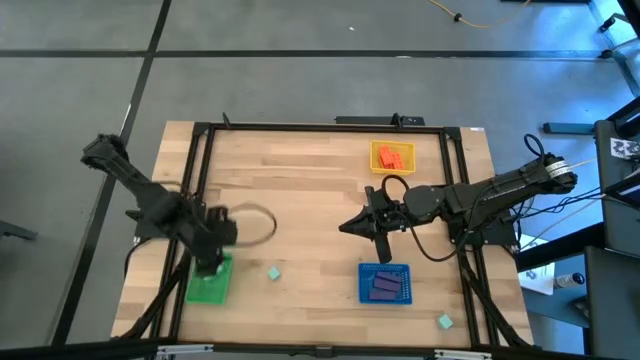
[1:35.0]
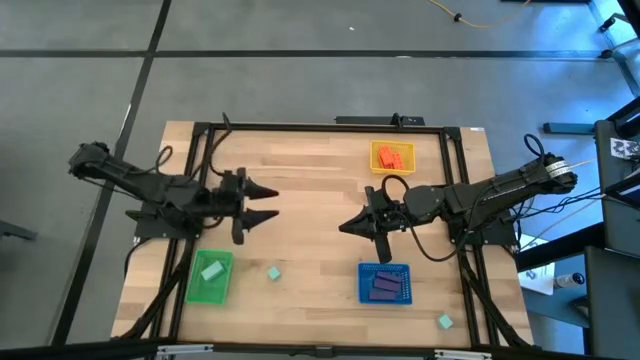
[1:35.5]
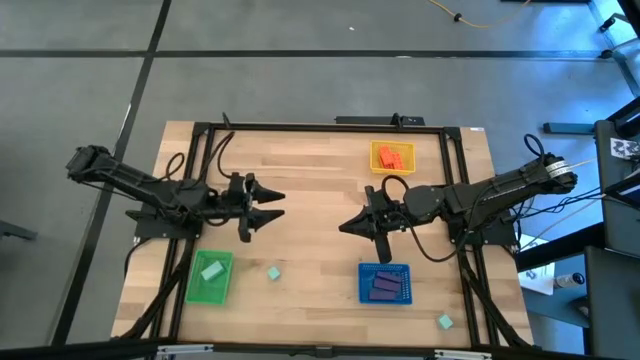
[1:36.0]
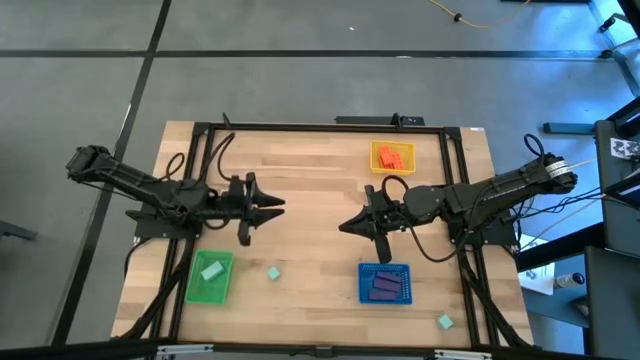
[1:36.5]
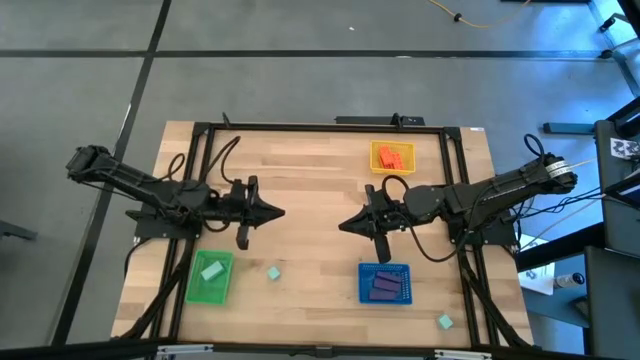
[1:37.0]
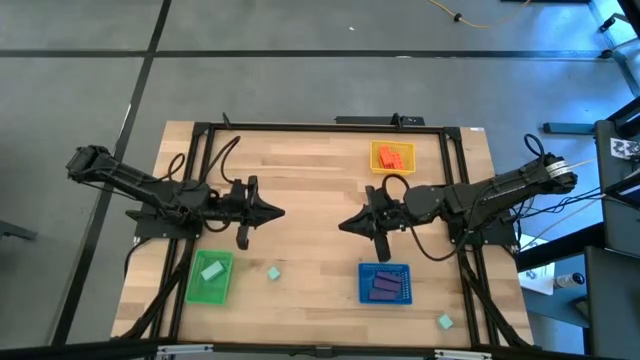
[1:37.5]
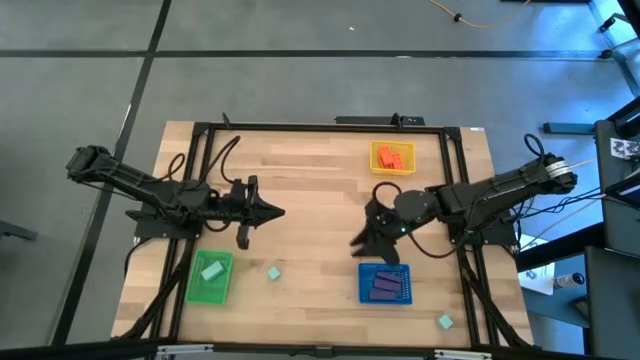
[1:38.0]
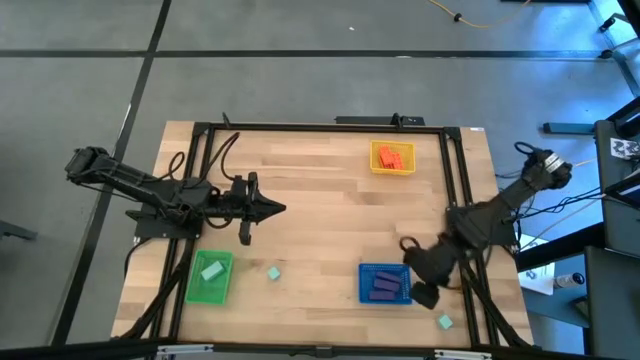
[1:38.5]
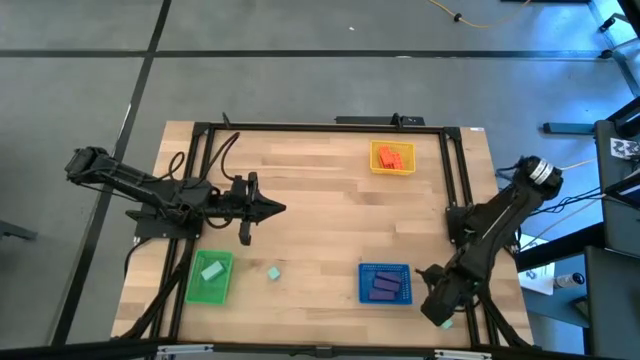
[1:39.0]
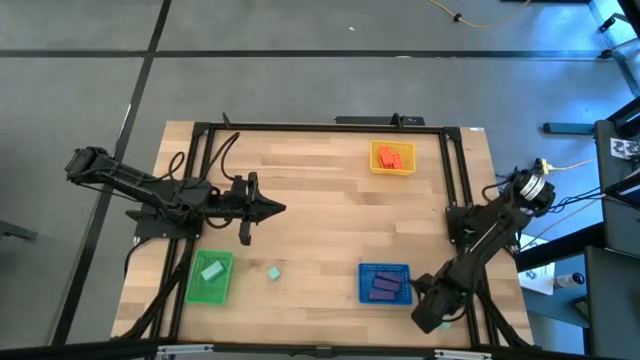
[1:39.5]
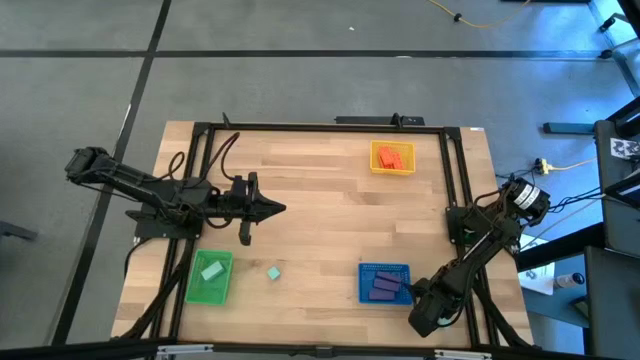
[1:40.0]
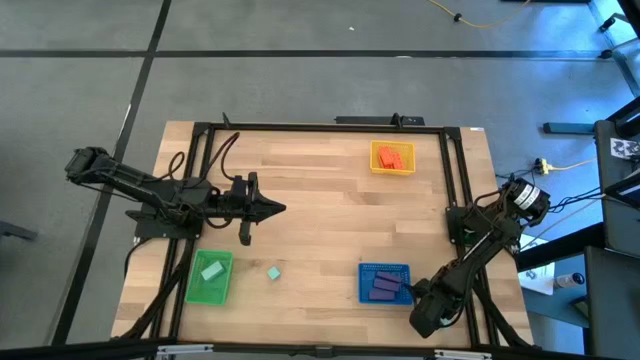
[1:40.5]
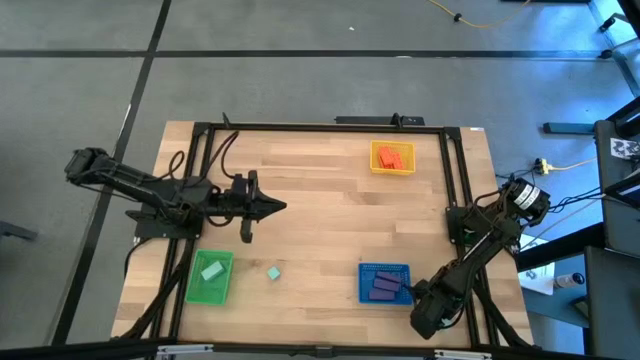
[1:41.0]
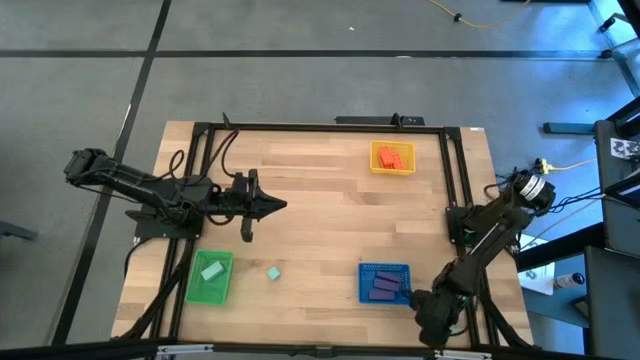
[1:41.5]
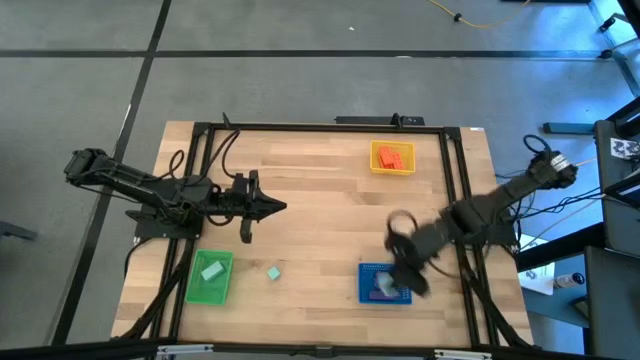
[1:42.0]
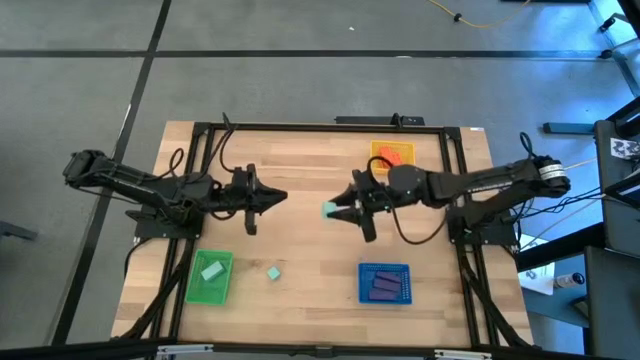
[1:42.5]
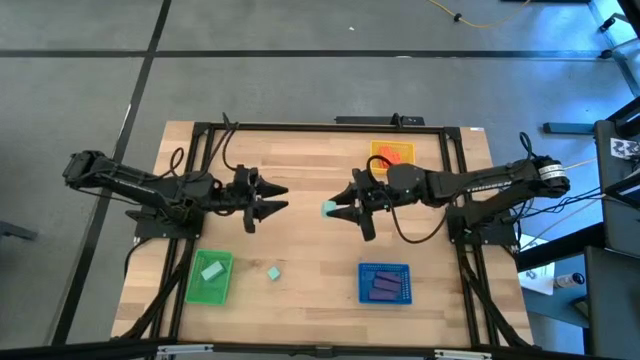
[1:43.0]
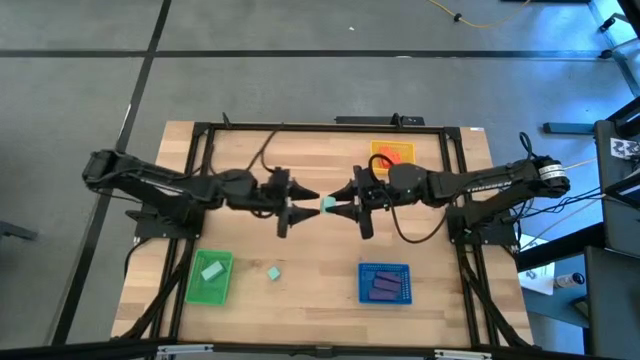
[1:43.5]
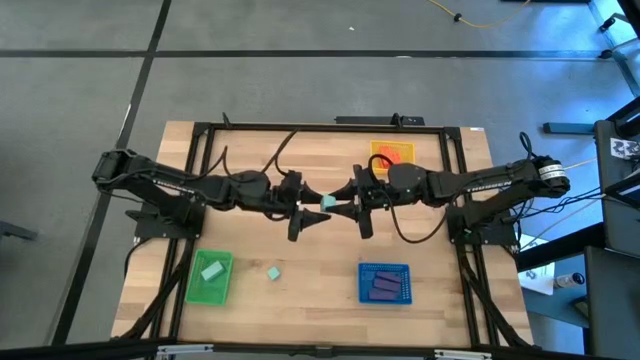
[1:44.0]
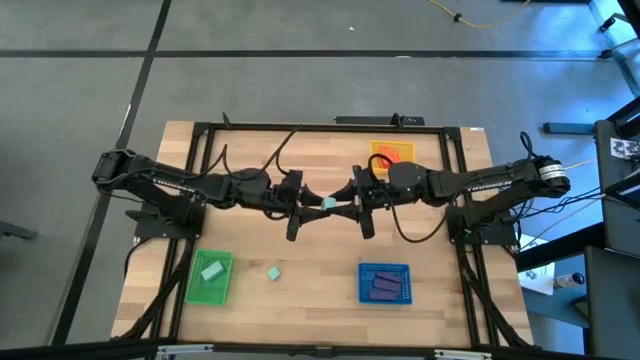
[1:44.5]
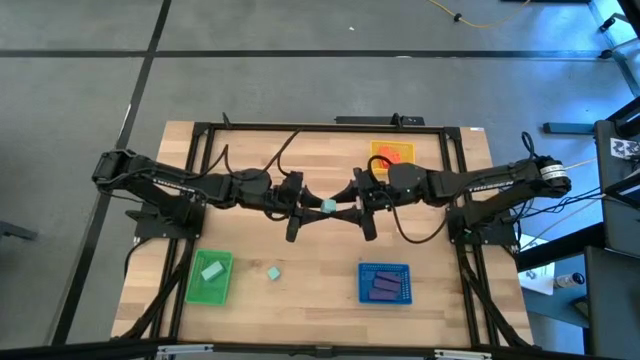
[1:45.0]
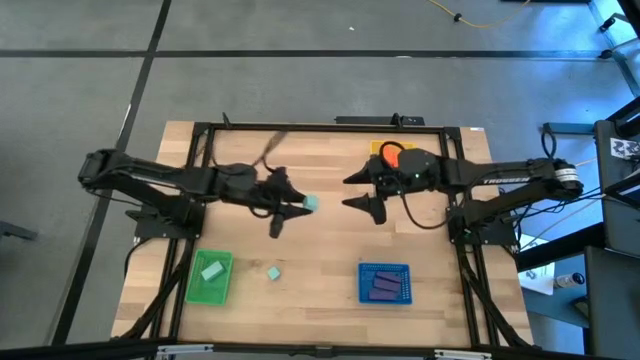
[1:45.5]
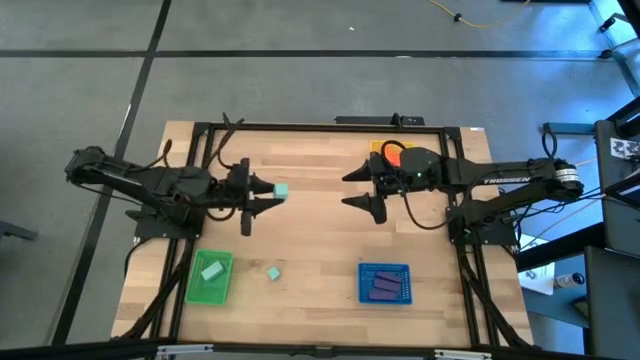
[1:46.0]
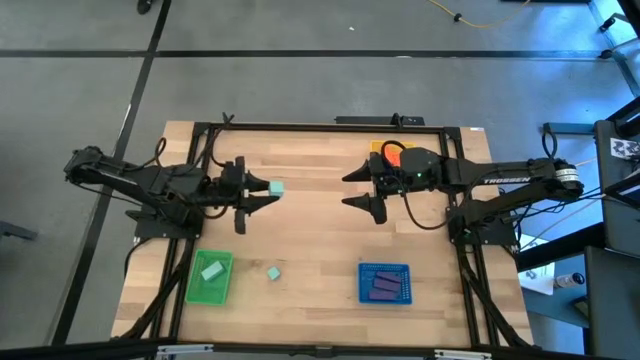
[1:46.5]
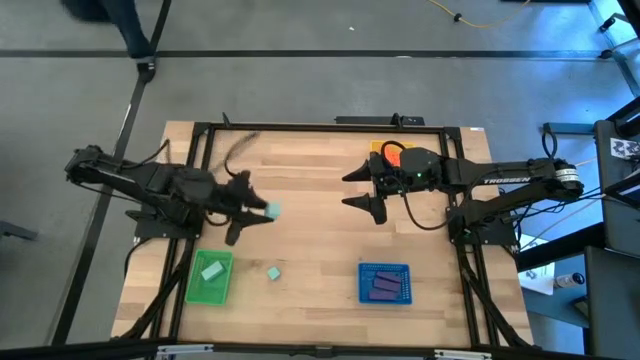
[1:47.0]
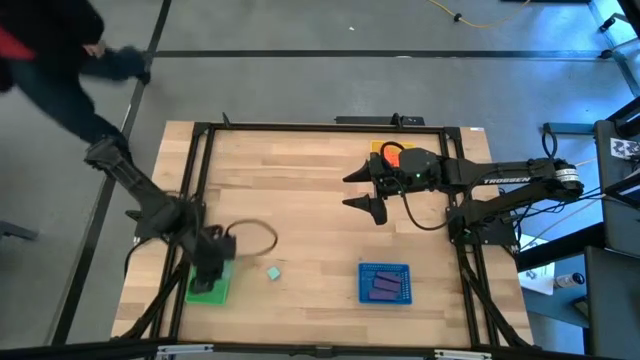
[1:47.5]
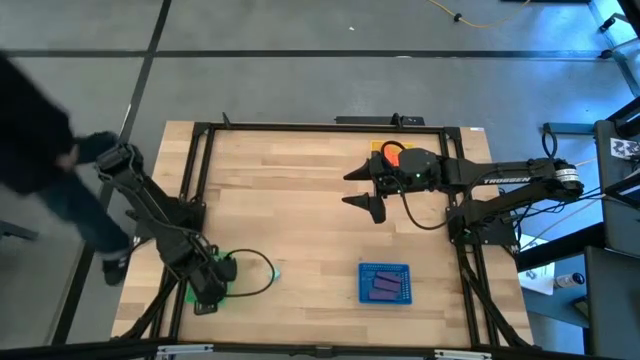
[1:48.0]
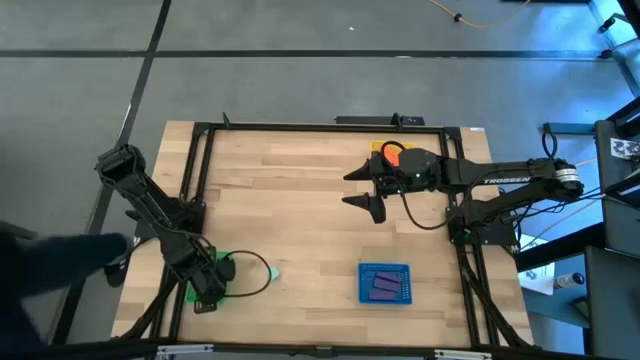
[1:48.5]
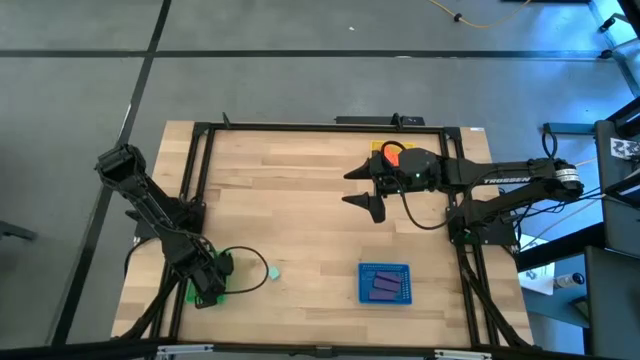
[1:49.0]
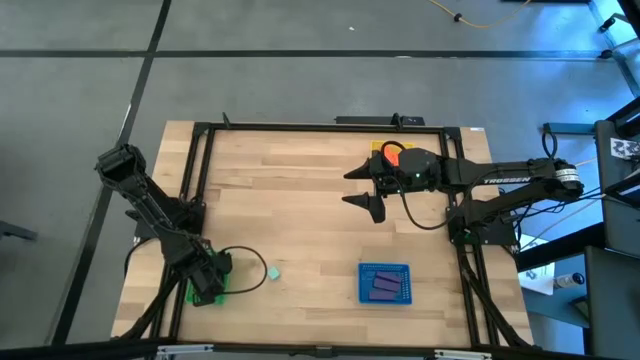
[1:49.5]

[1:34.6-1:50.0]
Task: Sort & place blocks by color
Put the right blue block into the green bin

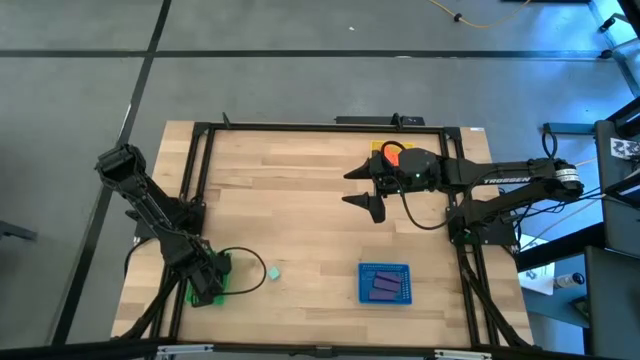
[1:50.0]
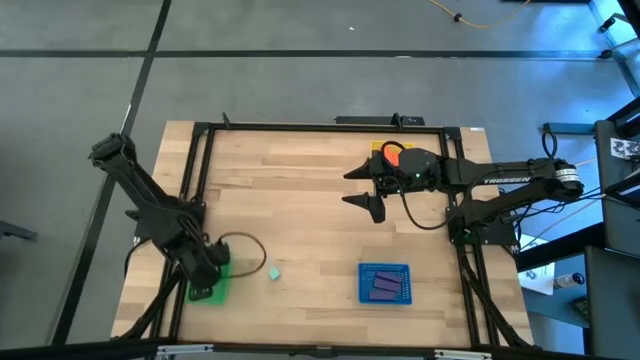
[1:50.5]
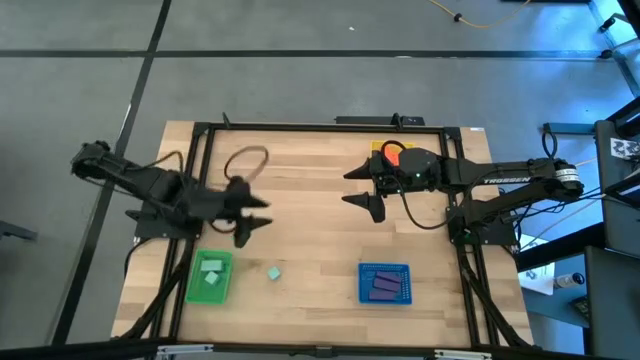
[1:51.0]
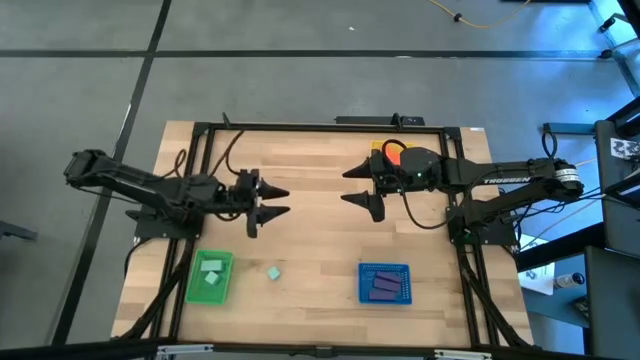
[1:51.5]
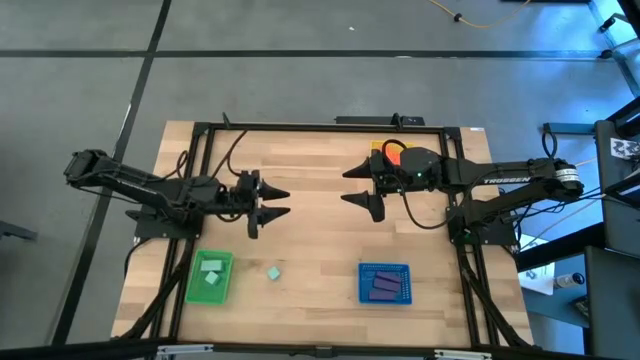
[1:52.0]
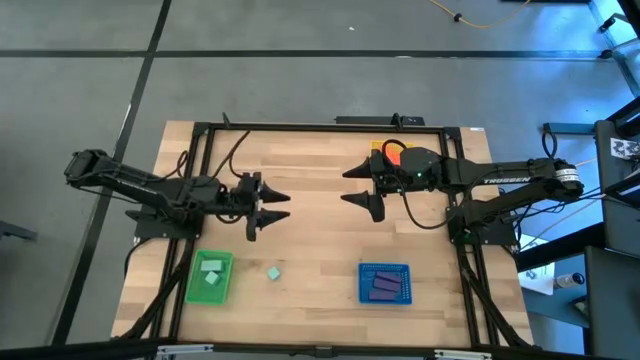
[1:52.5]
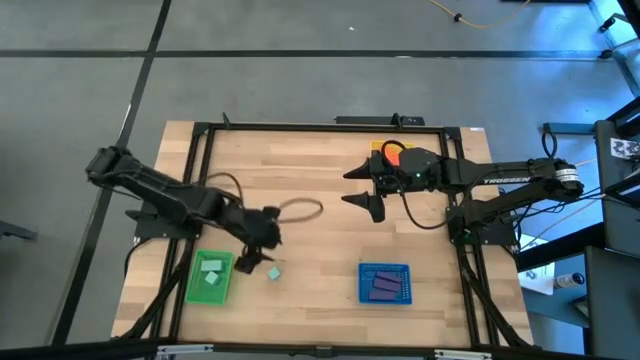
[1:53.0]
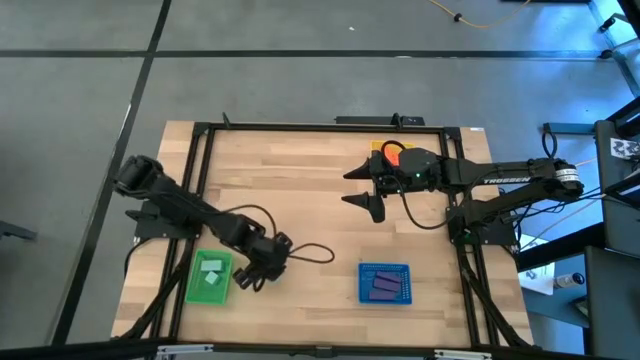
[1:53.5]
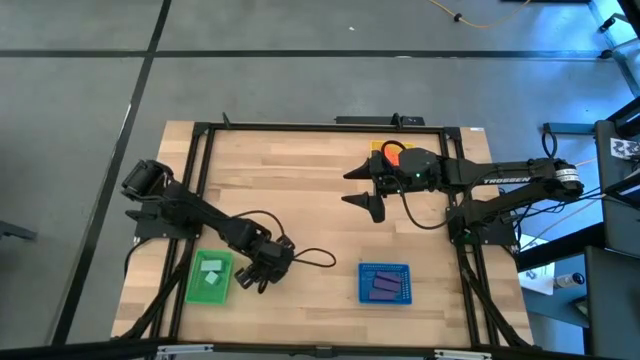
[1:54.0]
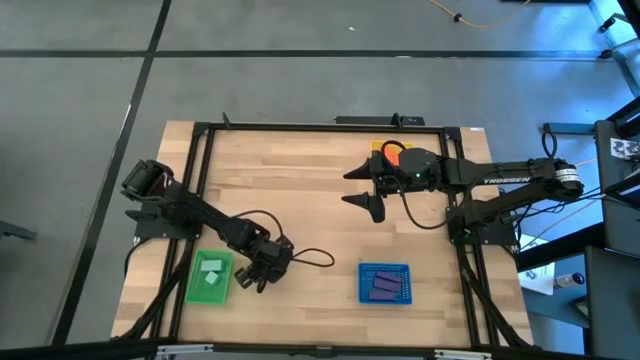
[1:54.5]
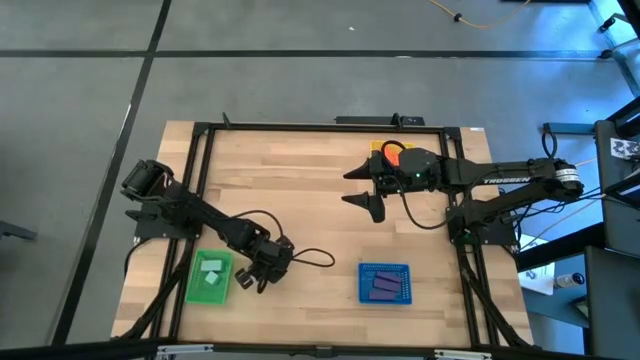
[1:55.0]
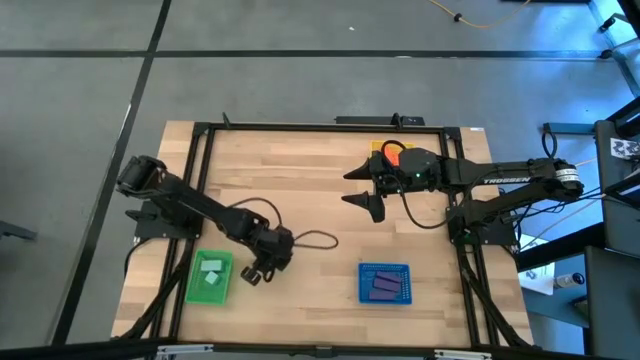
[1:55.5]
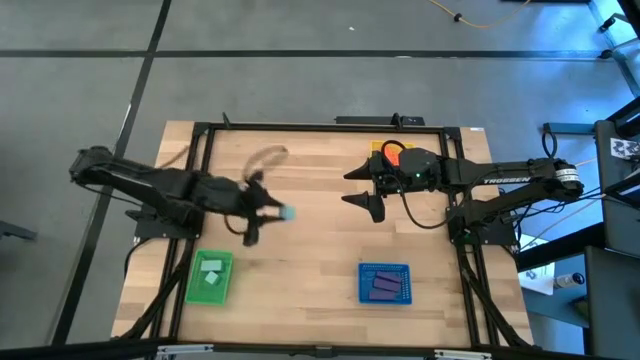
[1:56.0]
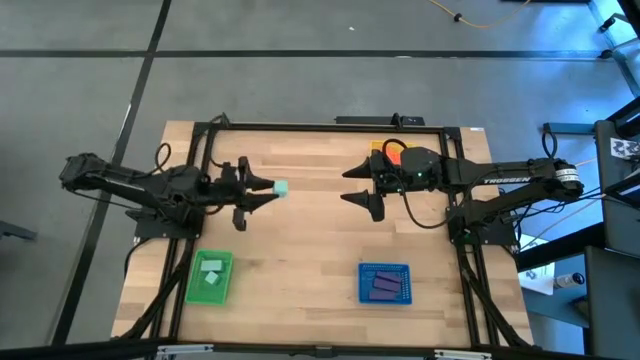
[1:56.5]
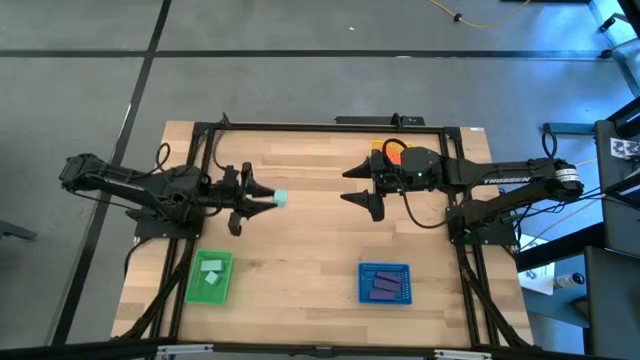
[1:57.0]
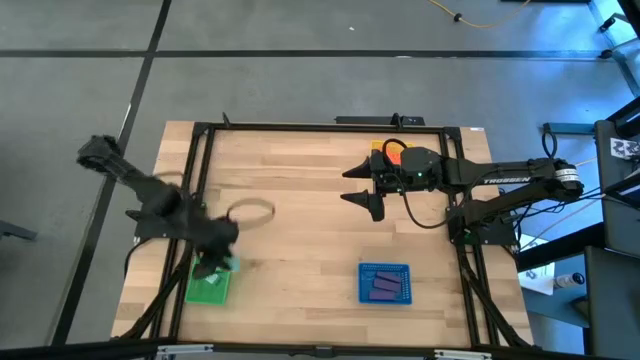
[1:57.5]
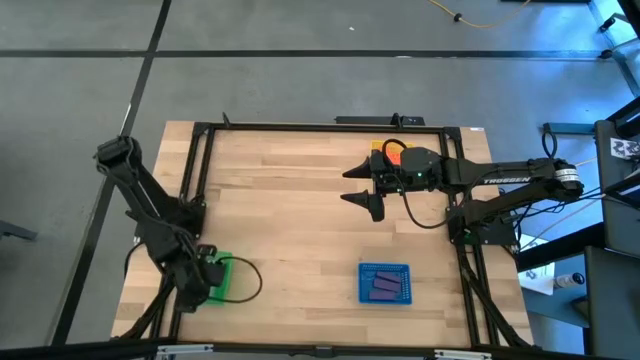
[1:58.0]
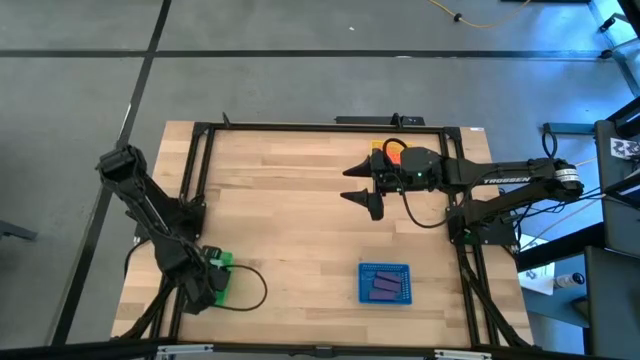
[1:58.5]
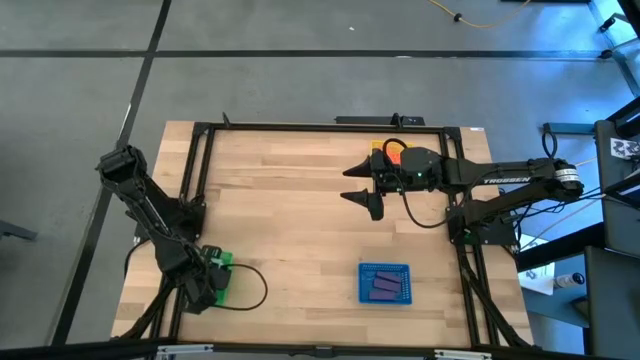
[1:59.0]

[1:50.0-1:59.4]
Put the blue block into the green bin
